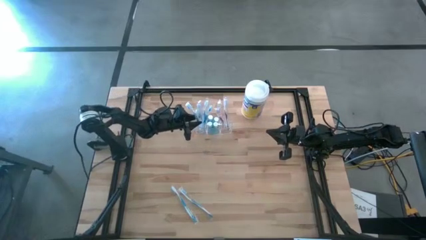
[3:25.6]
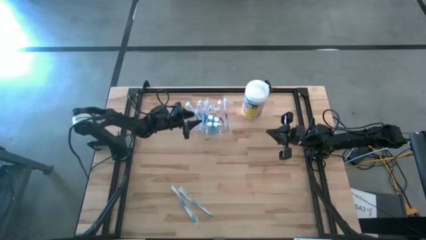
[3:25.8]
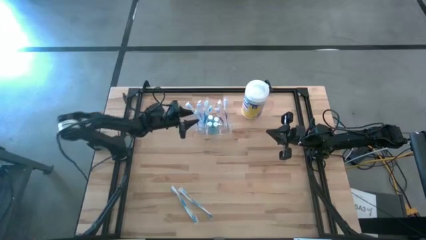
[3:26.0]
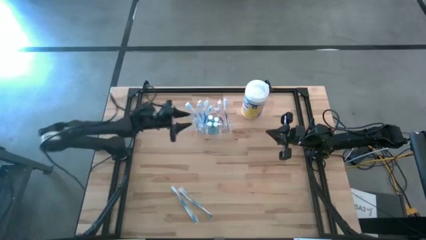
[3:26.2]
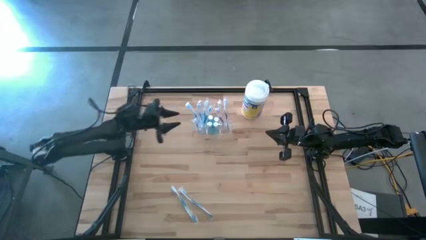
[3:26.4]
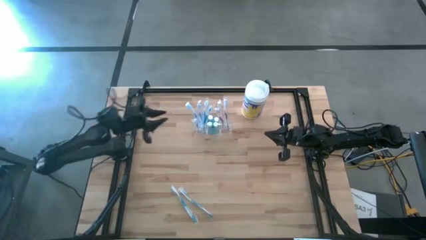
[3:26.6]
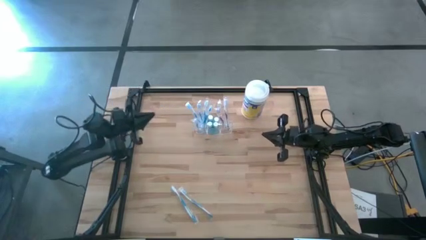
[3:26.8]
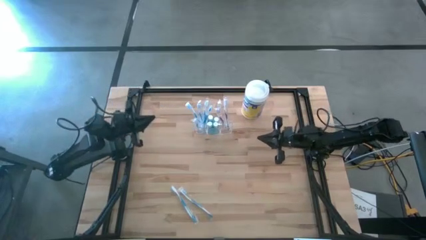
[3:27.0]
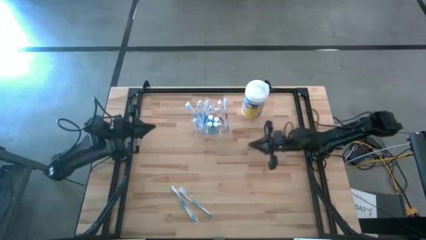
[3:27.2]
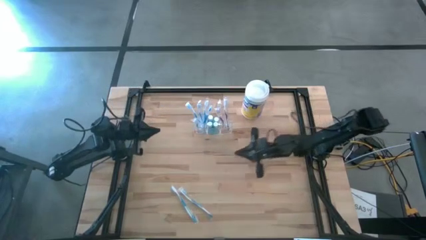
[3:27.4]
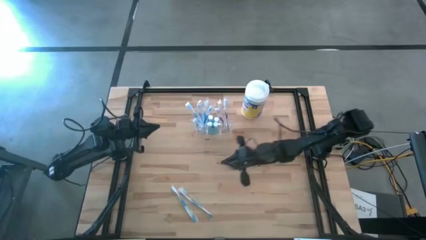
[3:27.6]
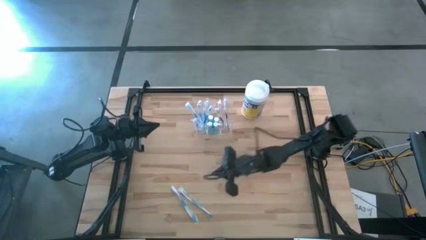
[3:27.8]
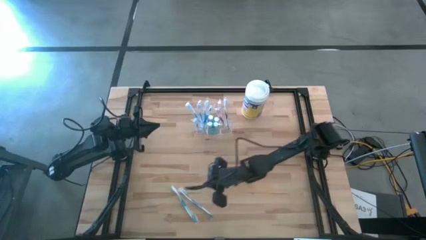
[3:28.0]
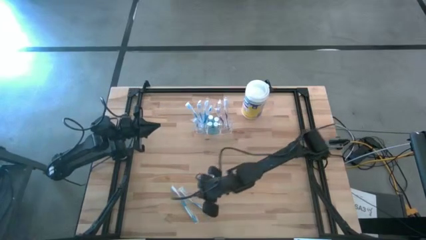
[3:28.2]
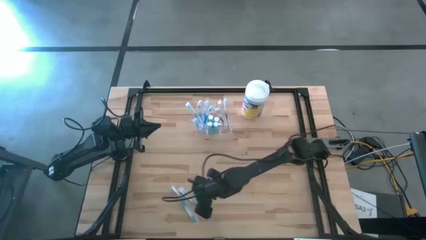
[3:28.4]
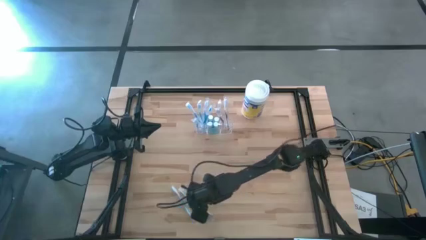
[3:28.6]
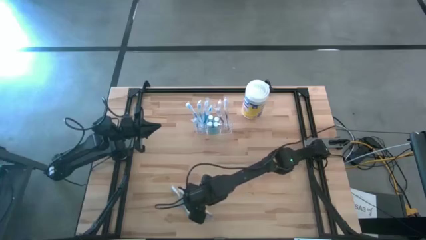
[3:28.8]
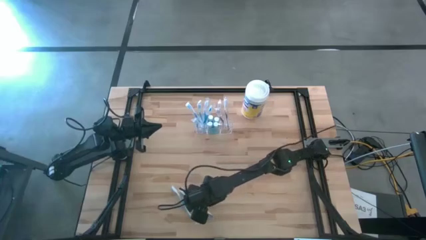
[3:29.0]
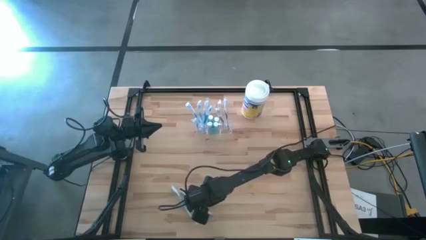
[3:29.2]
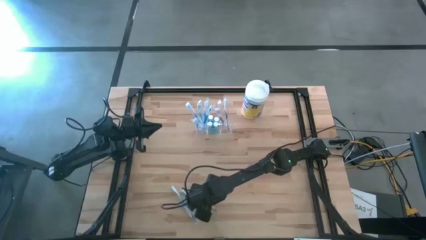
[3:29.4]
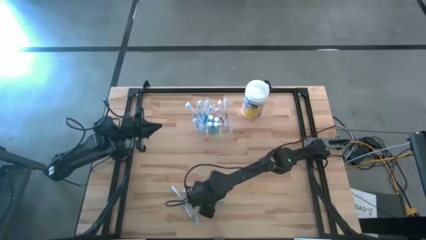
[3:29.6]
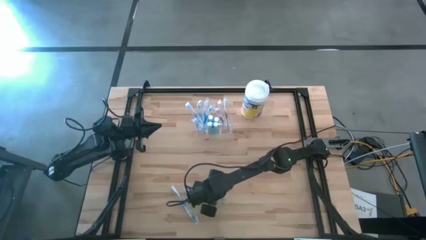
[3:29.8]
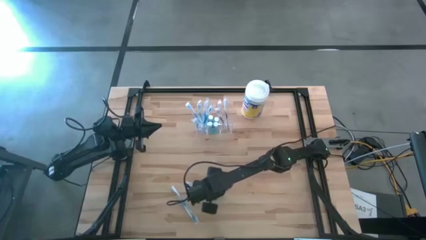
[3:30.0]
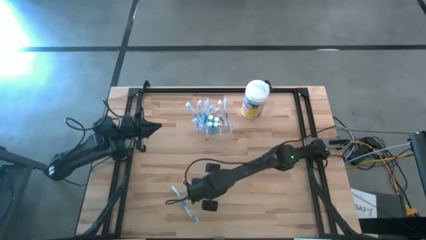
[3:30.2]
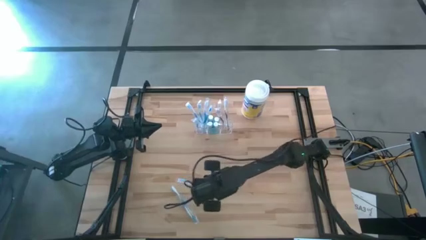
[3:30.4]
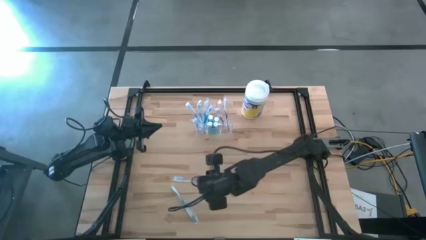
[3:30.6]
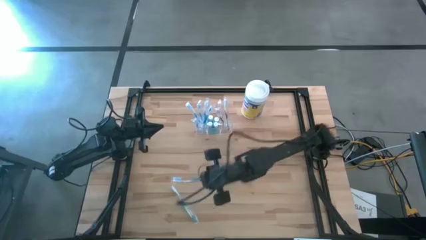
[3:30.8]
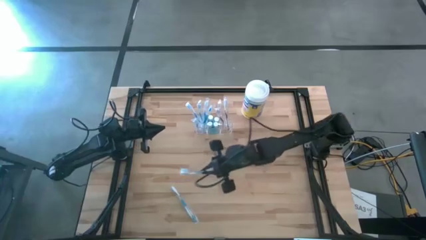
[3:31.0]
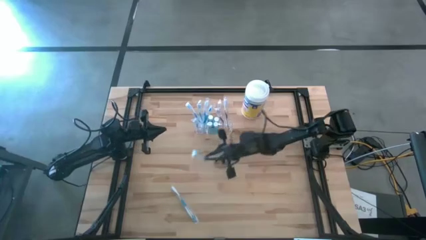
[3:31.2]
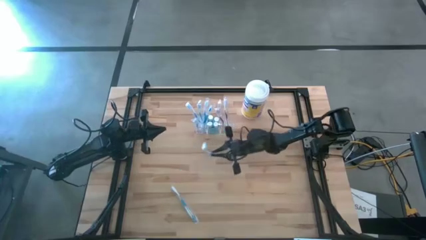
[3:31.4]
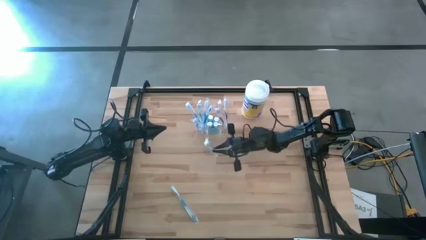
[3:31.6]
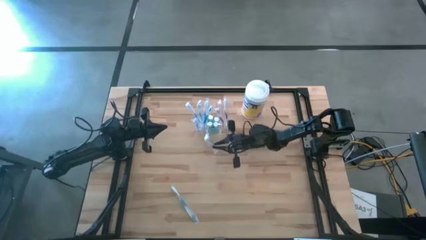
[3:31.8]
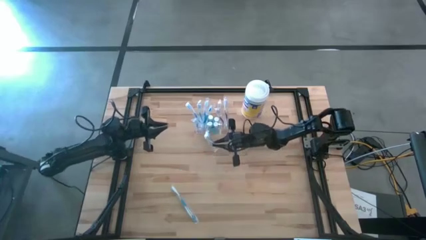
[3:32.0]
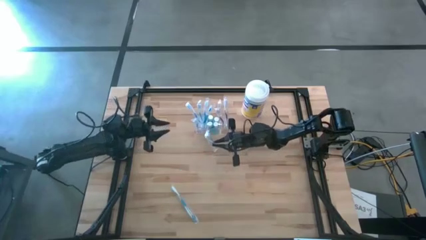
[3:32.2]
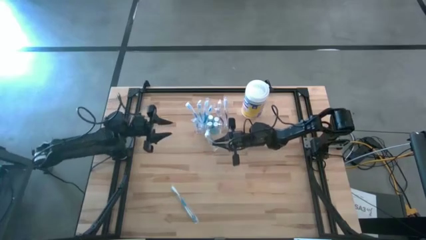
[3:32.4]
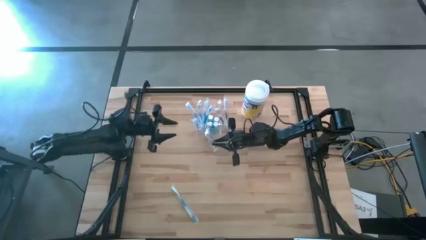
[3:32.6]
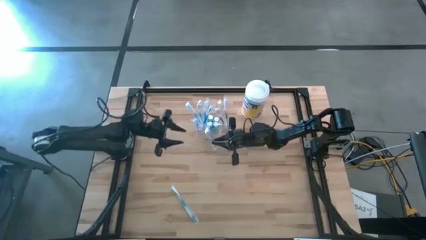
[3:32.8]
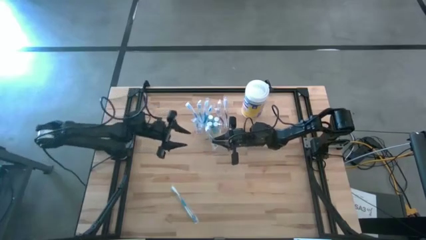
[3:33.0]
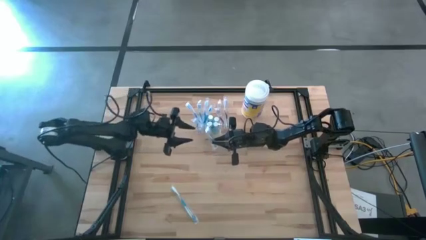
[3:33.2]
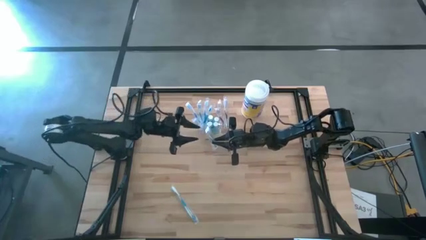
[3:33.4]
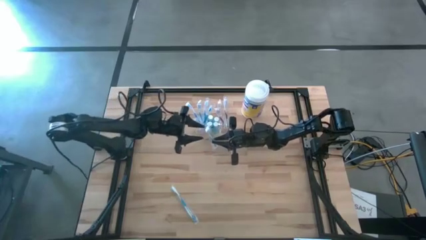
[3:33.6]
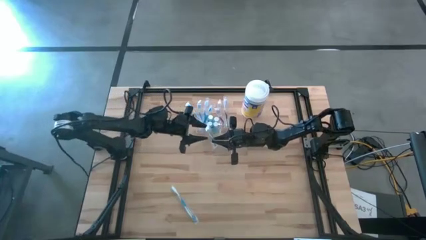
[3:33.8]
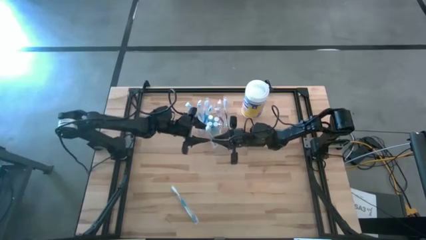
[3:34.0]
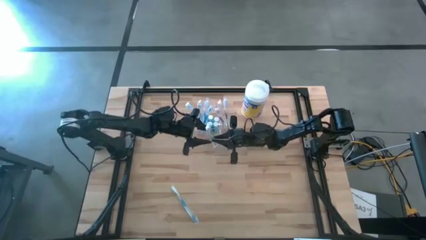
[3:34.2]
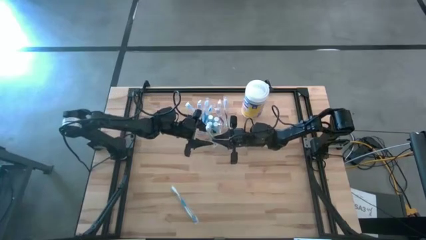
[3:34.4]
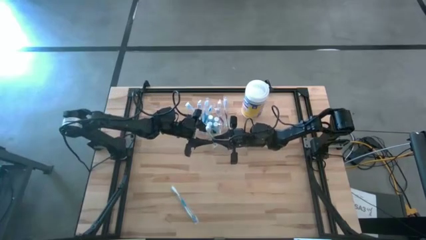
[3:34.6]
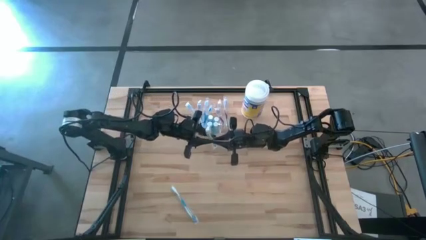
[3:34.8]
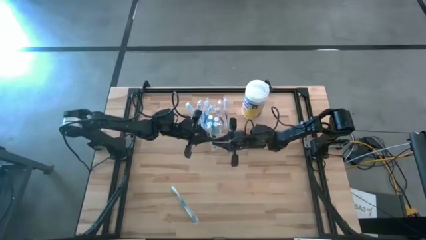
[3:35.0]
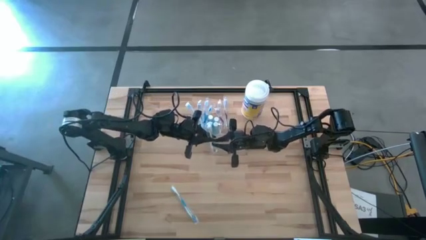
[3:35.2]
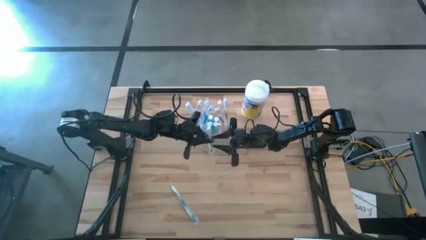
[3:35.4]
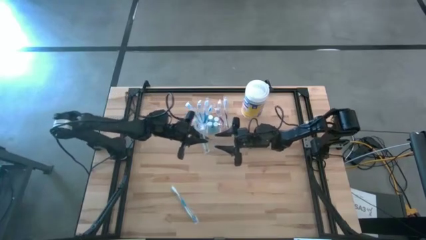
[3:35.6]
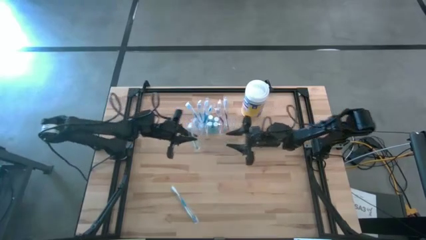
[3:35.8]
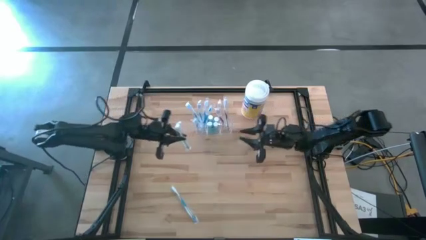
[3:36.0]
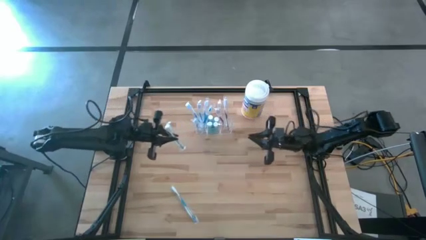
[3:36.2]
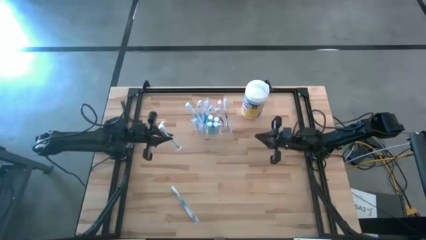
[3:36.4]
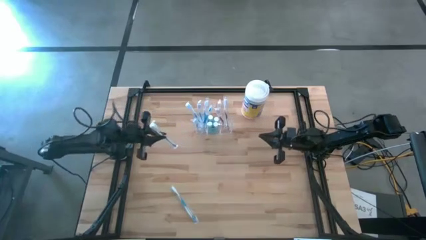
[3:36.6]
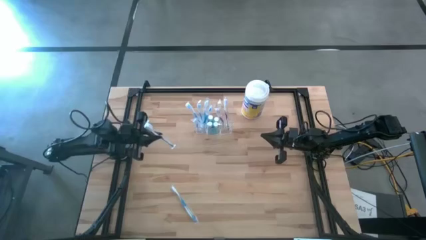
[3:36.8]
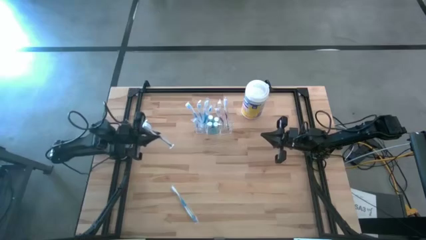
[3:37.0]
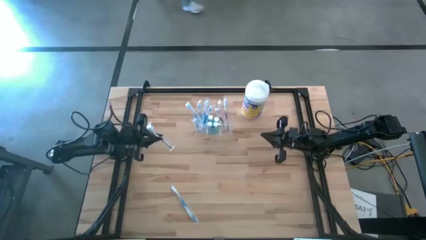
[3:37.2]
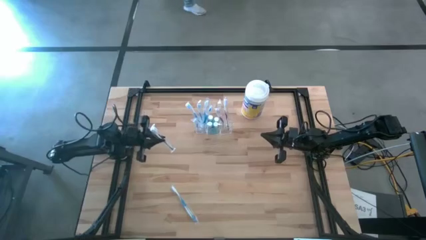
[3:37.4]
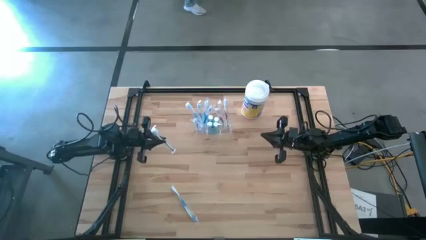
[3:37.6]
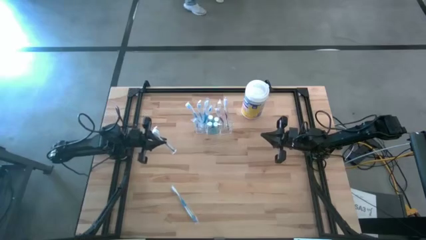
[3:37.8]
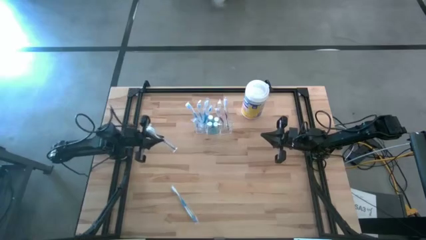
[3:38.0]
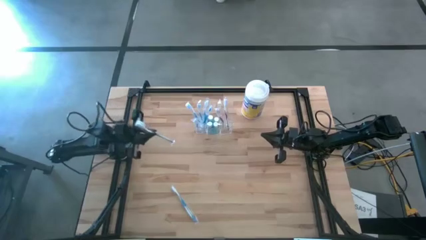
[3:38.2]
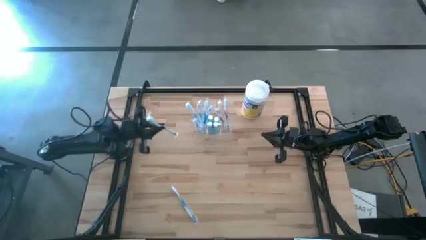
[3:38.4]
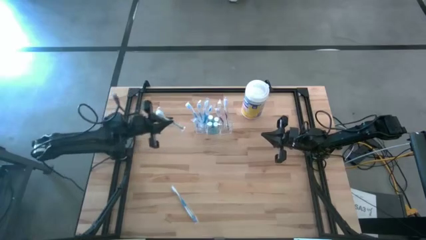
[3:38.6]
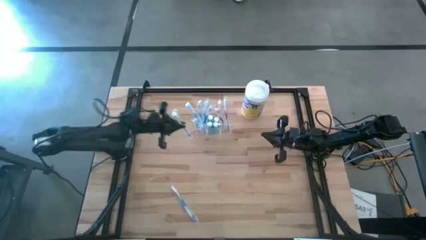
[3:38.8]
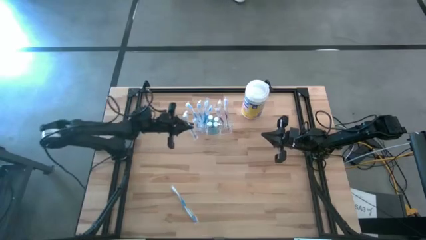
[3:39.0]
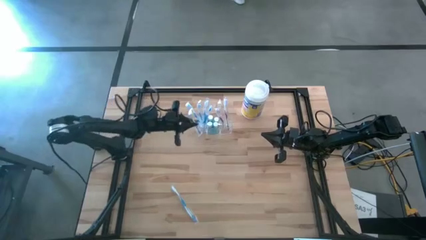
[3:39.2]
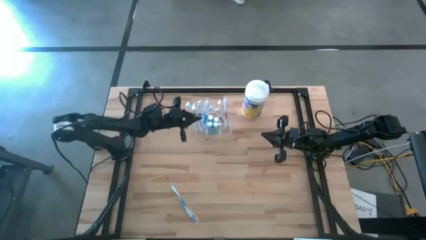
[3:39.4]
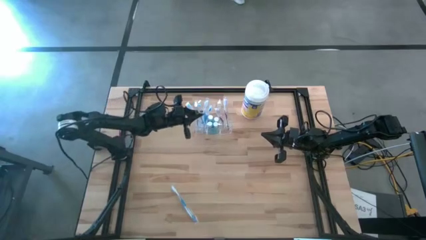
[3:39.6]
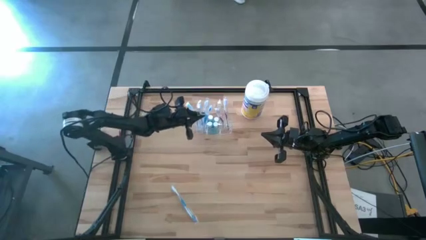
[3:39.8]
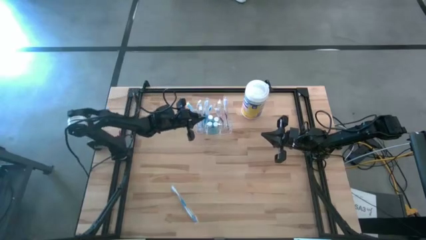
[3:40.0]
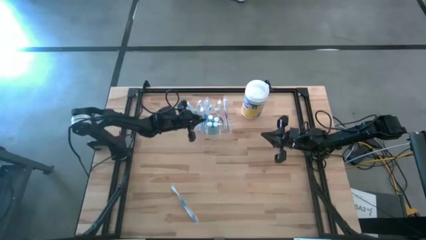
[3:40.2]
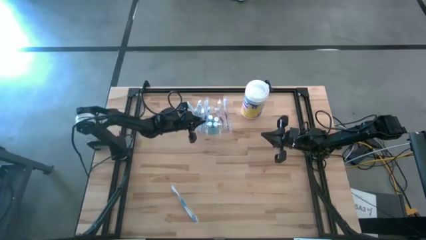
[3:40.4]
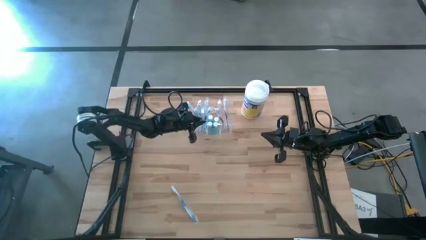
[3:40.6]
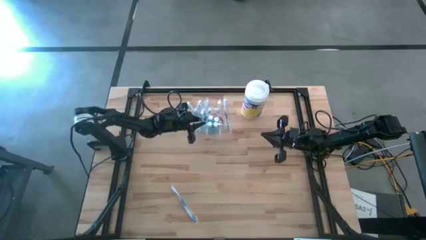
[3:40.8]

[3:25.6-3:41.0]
Task: Pick & Place toothbrushing station
Put the blue toothbrush into the transparent organizer
